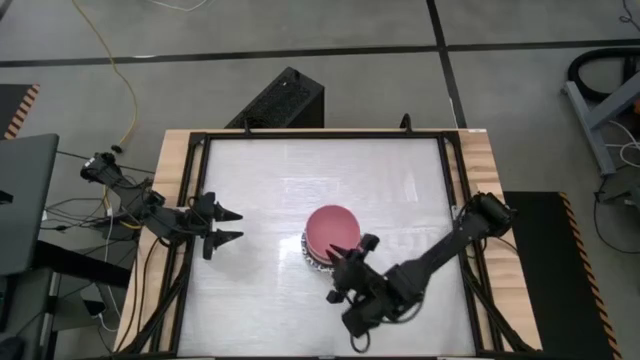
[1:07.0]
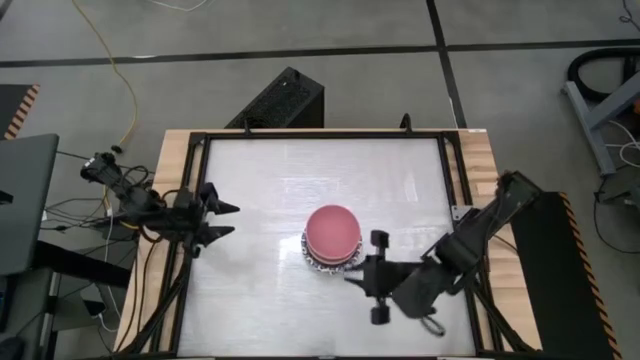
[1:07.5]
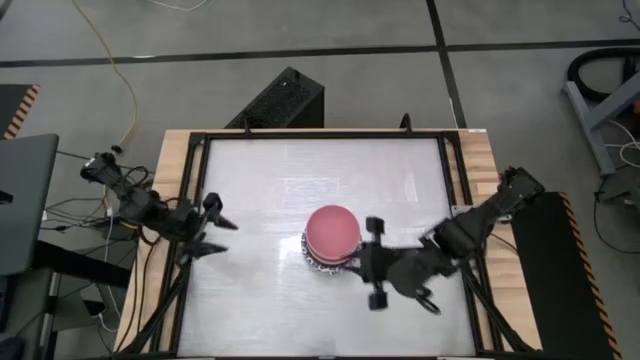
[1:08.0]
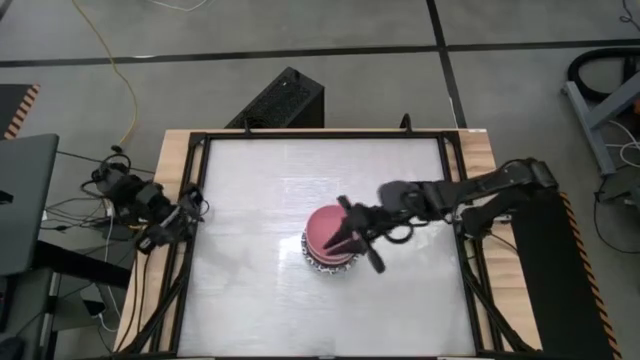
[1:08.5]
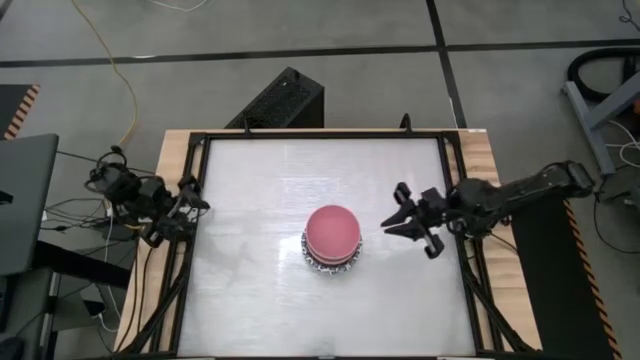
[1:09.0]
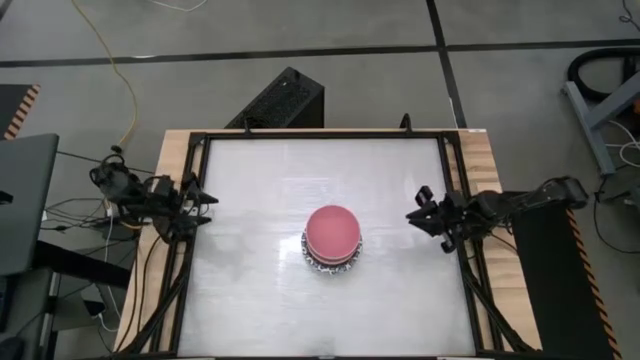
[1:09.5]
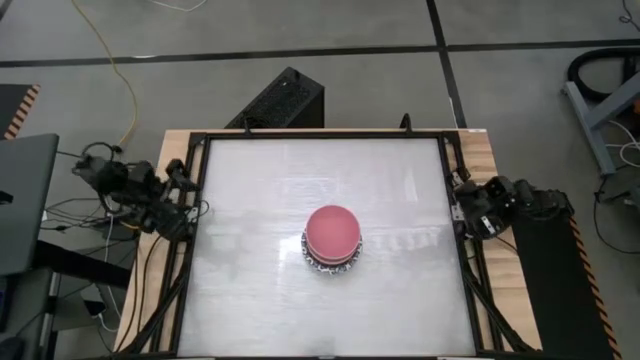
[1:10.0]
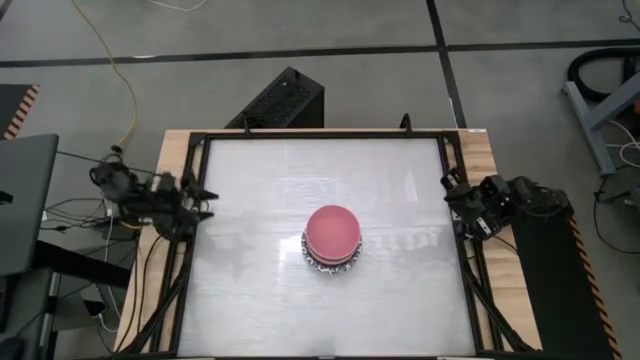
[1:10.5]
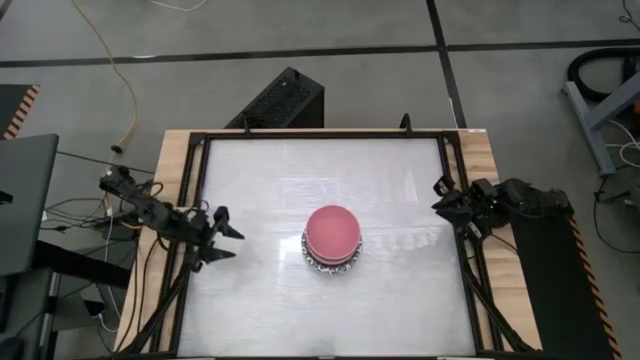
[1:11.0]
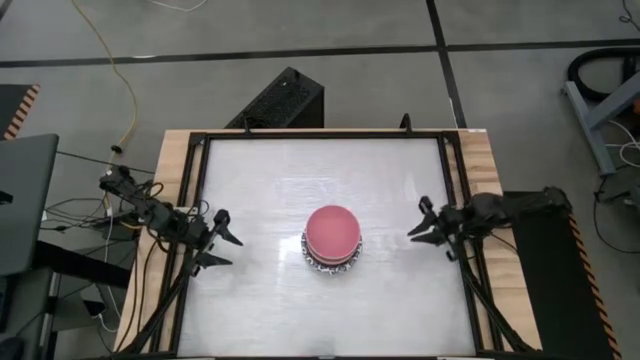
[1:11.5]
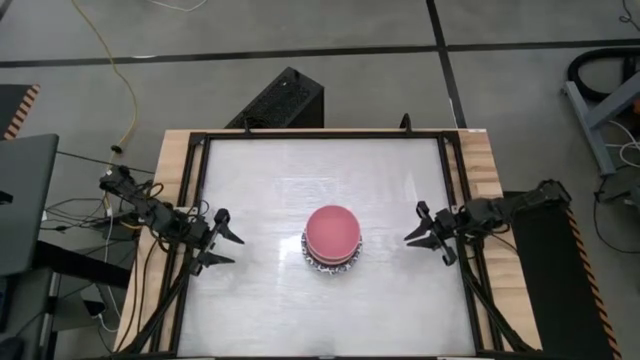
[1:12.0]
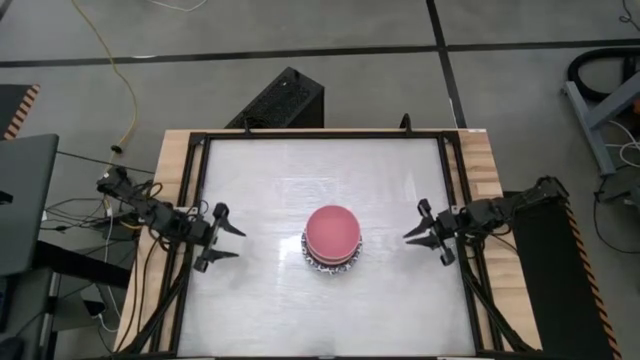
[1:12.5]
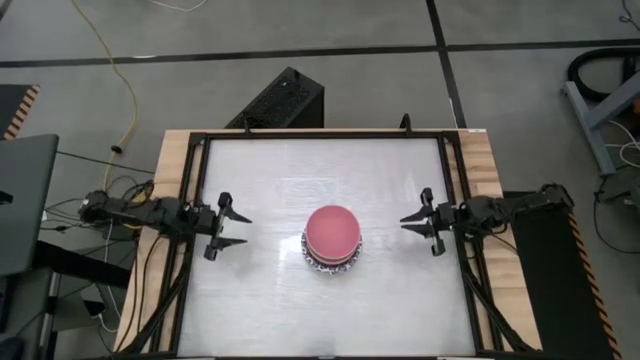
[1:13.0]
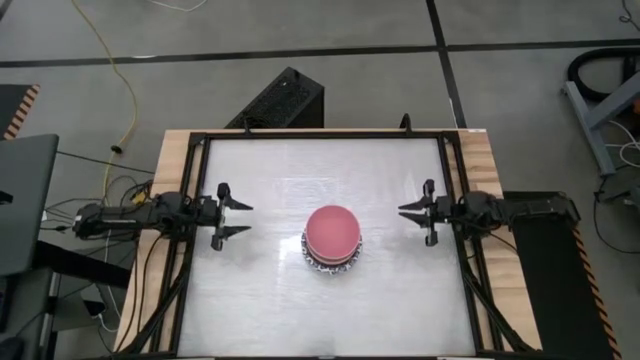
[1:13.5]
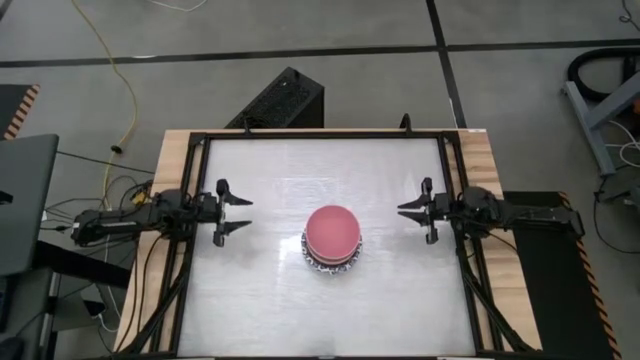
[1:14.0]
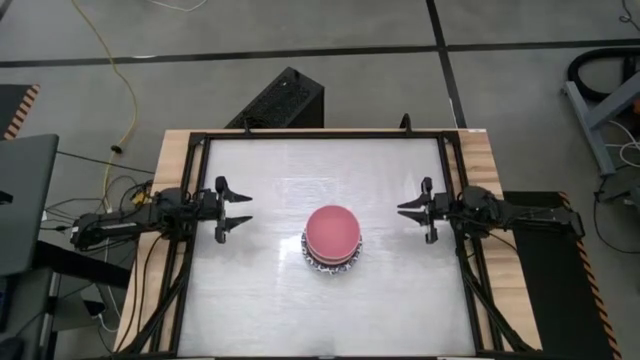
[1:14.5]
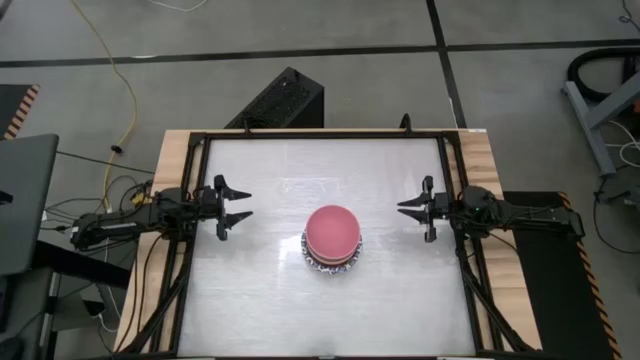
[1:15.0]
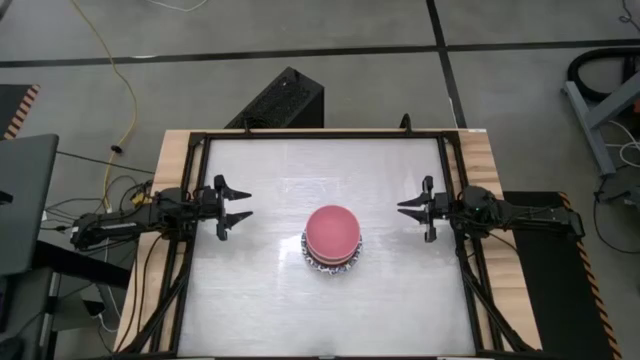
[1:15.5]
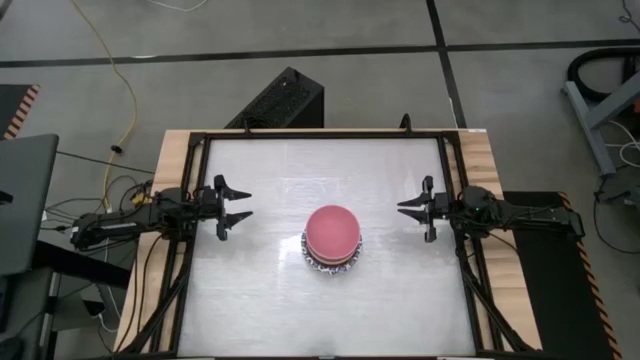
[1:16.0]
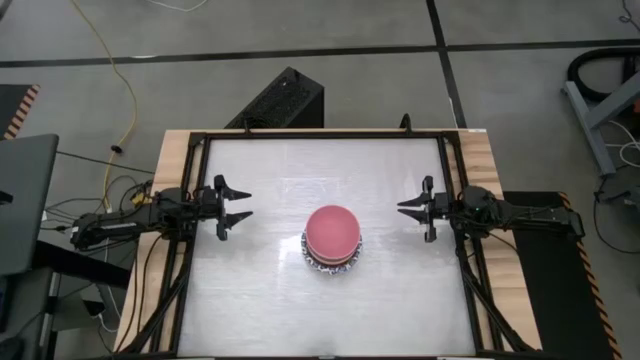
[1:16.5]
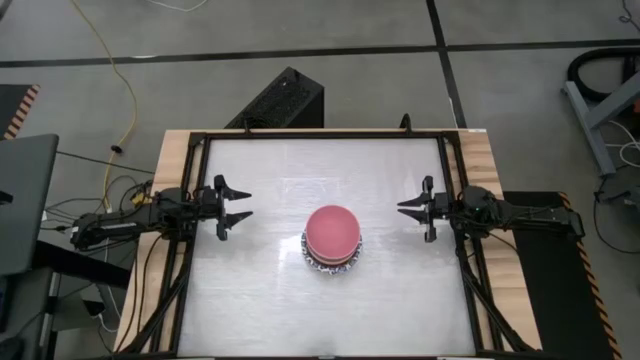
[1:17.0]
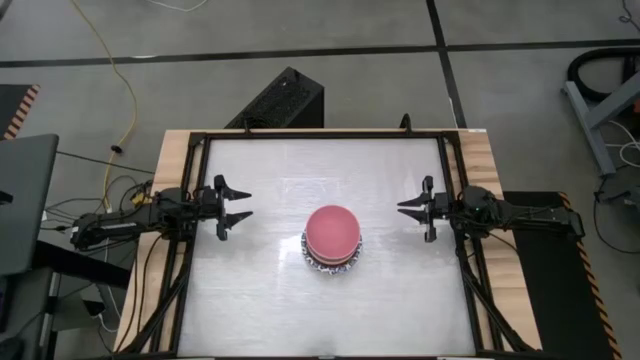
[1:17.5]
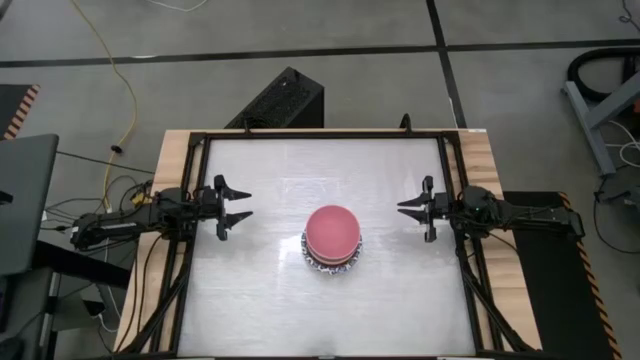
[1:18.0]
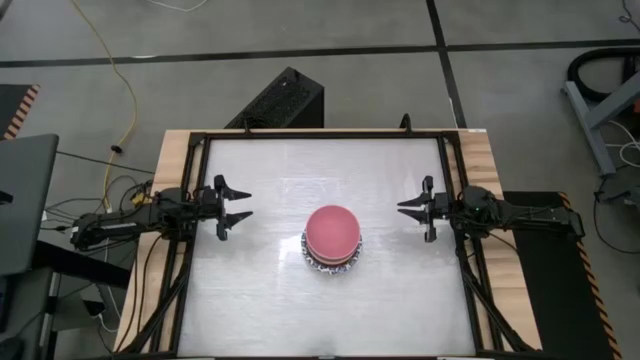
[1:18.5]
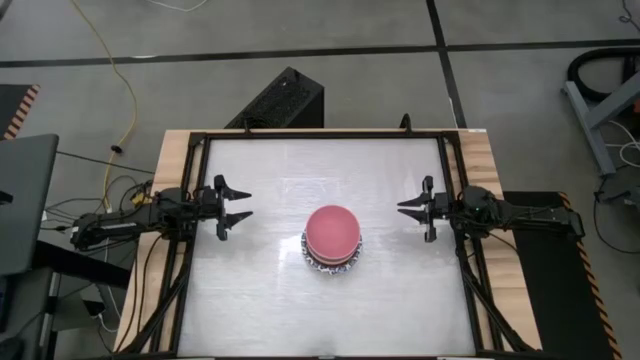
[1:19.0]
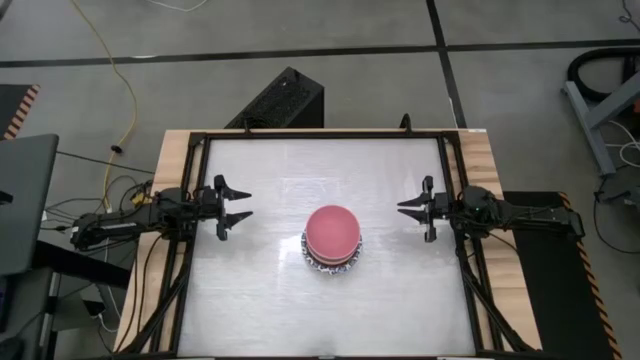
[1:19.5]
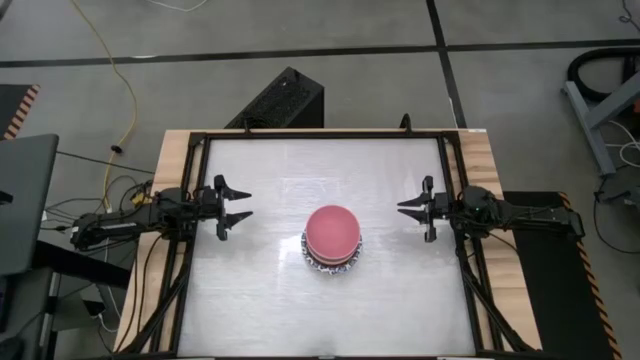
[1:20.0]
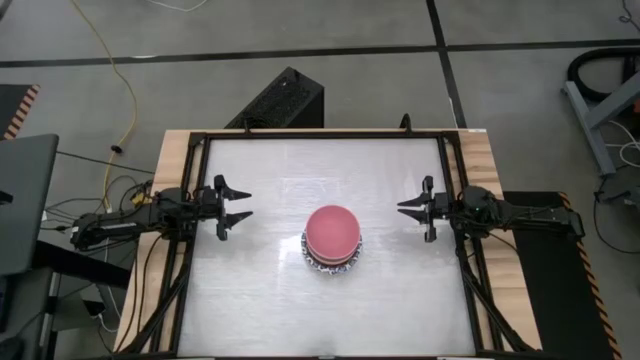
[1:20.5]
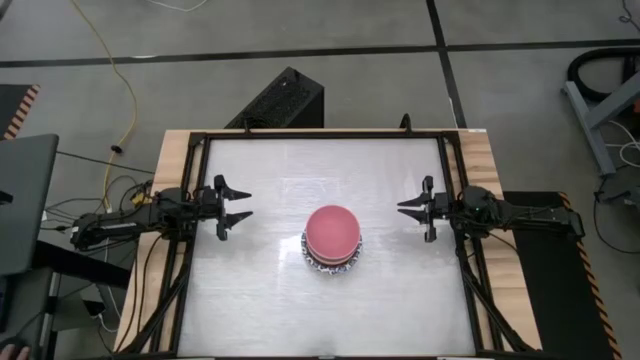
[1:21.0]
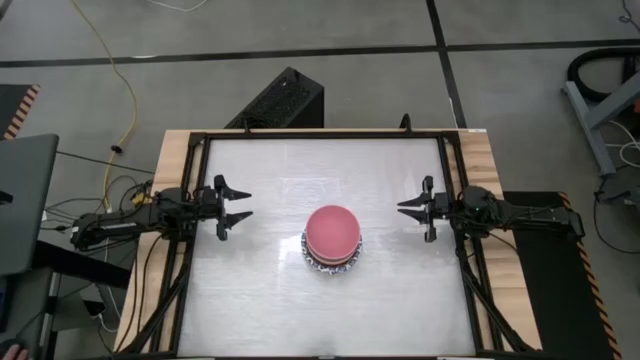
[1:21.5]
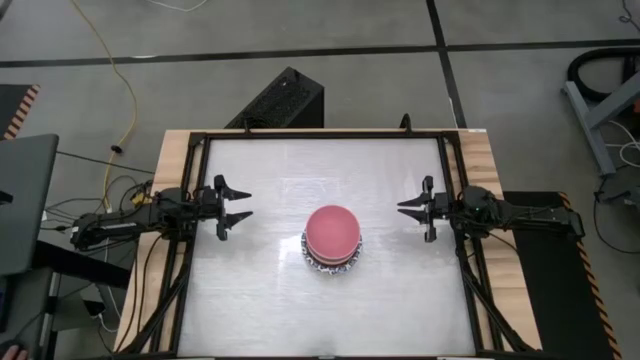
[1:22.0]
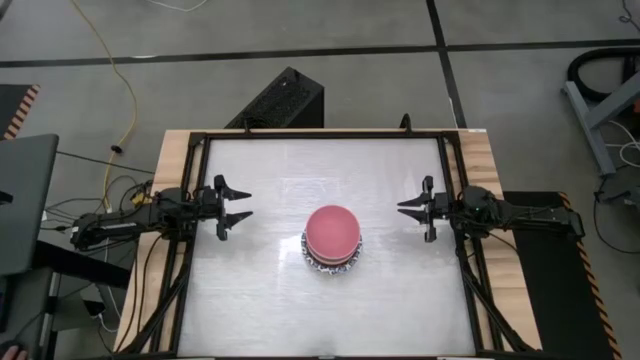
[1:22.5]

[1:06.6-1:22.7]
Return to Home Position

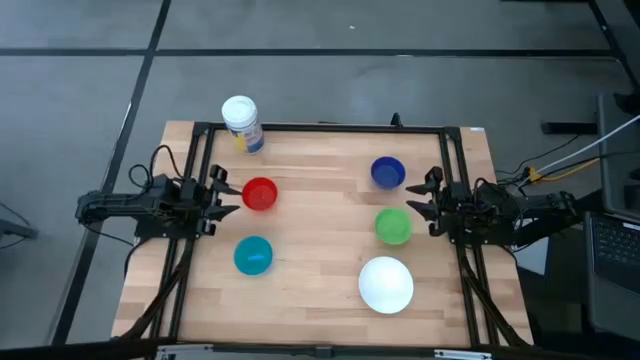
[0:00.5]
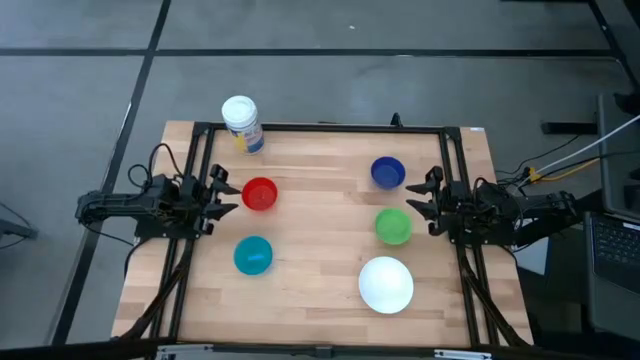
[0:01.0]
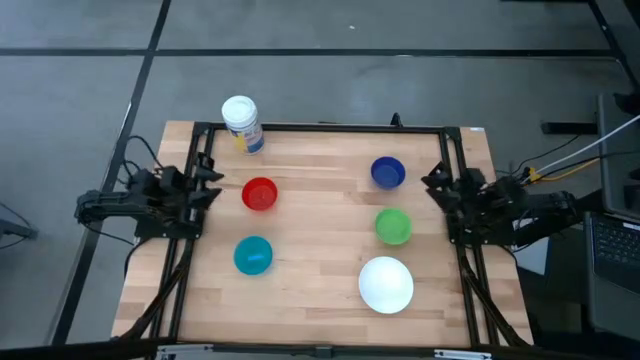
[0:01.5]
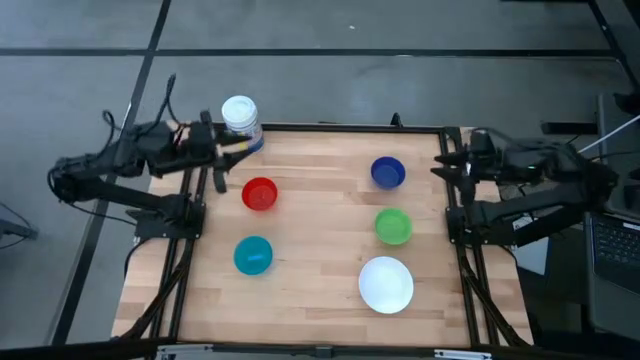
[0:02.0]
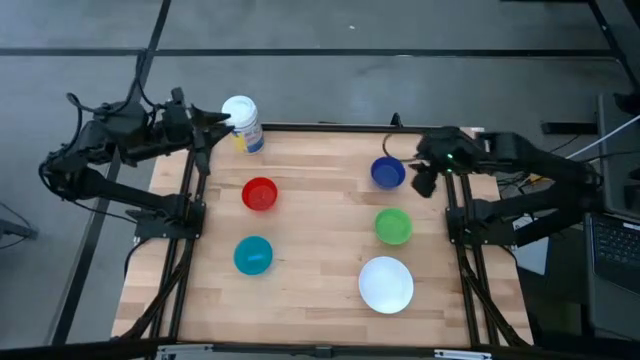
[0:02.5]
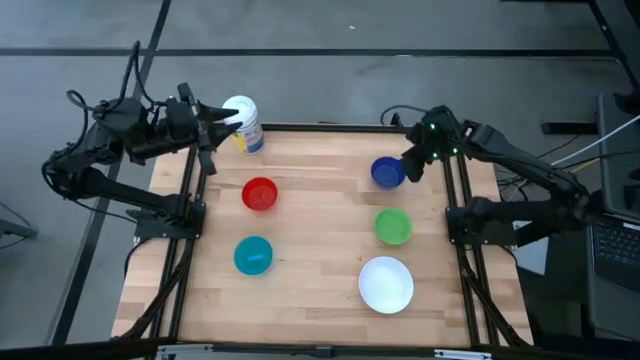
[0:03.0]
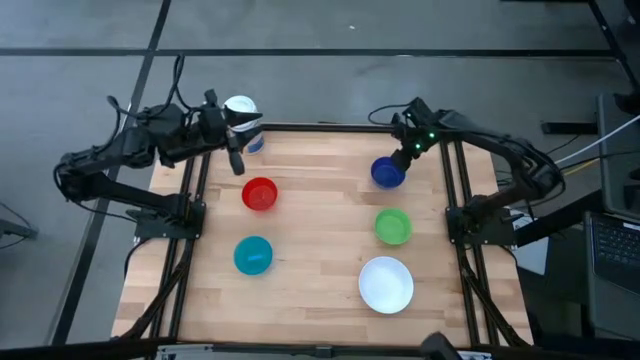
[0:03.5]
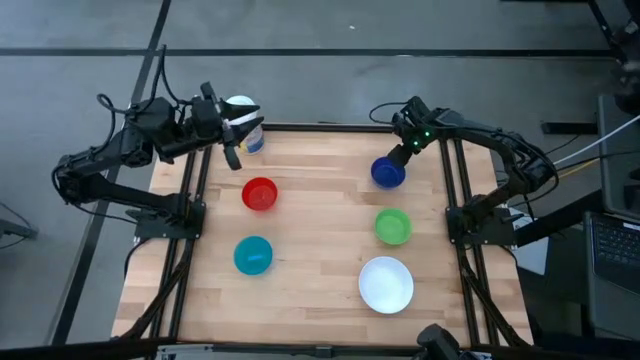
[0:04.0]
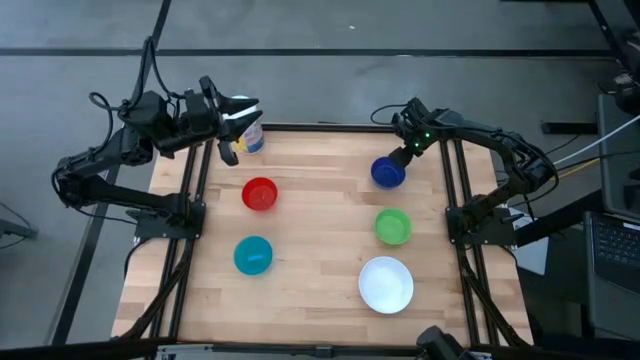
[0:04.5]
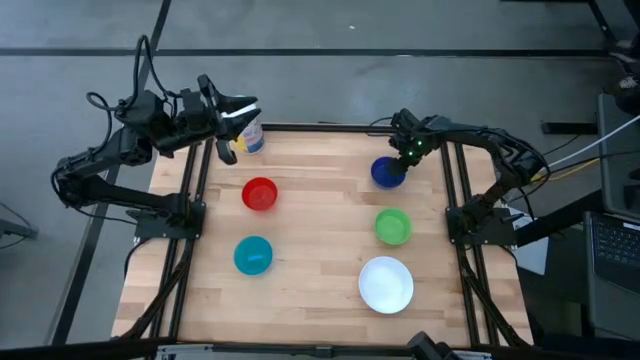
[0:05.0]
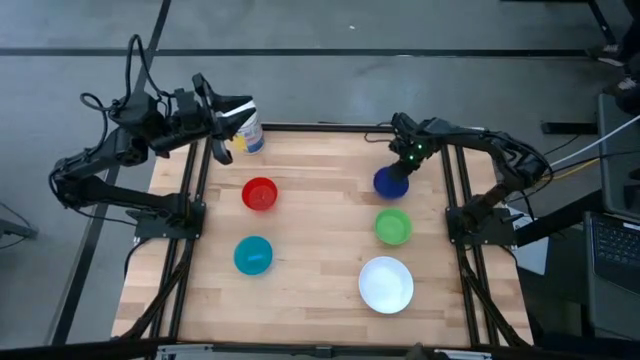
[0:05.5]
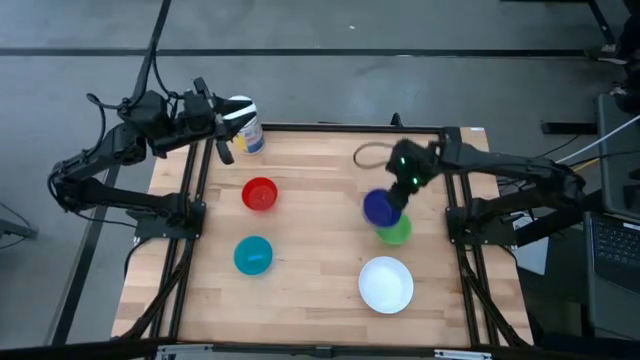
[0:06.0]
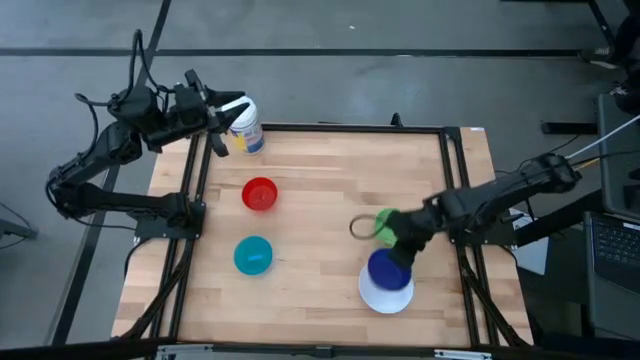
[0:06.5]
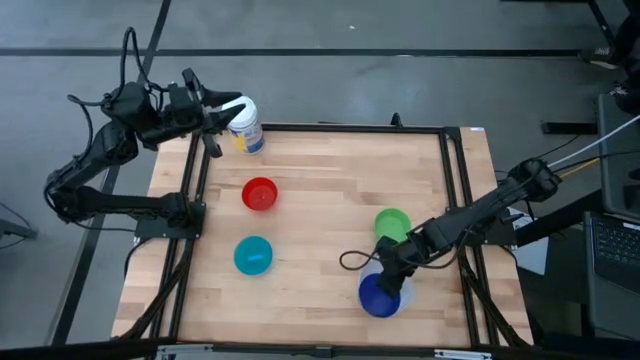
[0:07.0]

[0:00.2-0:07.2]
Stack the dark blue bowl on top of the white bowl
